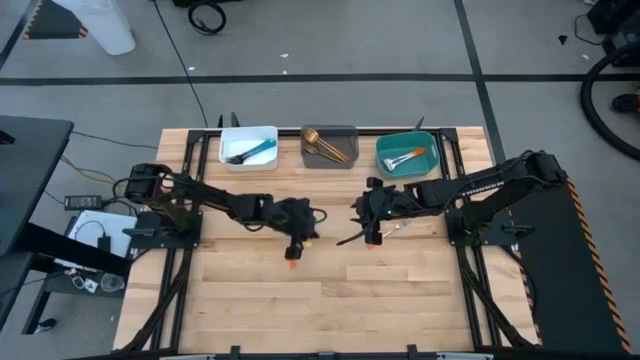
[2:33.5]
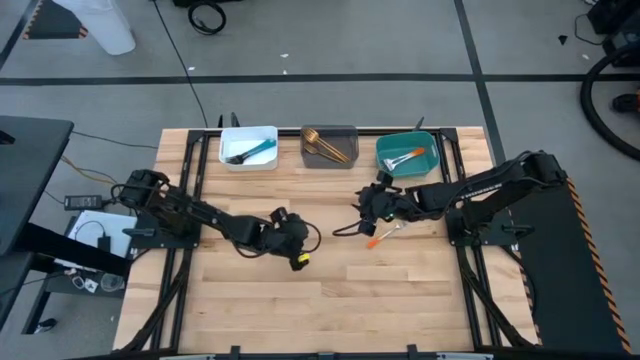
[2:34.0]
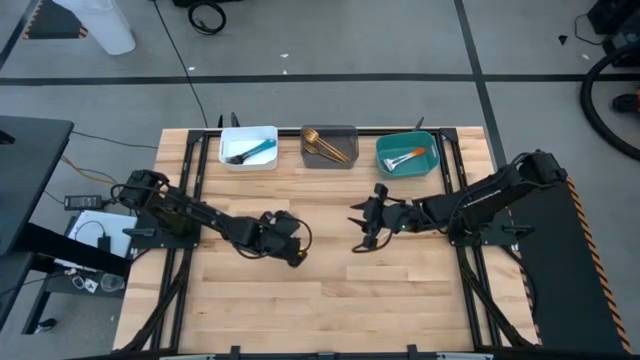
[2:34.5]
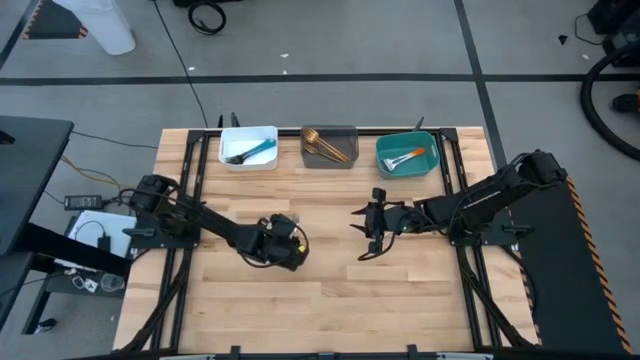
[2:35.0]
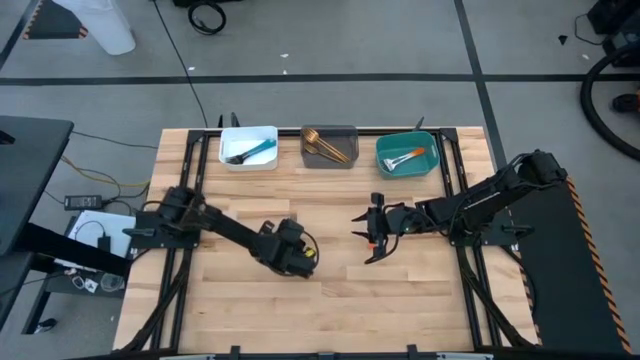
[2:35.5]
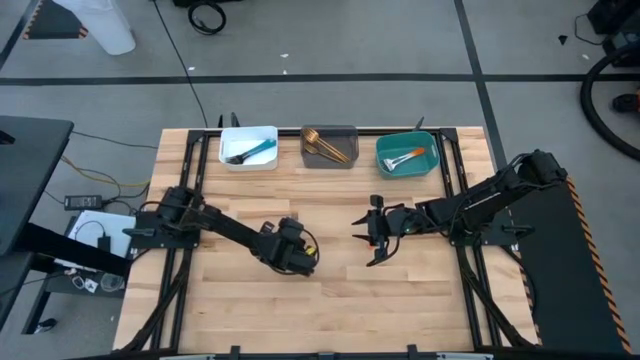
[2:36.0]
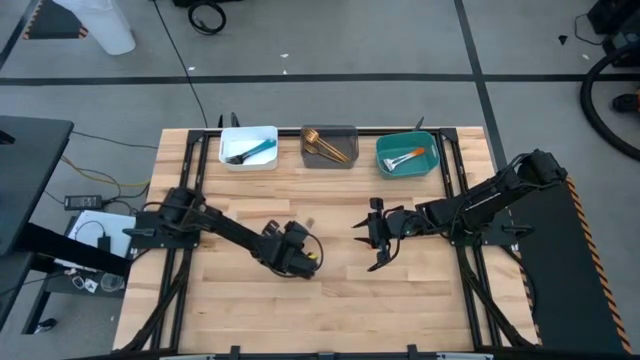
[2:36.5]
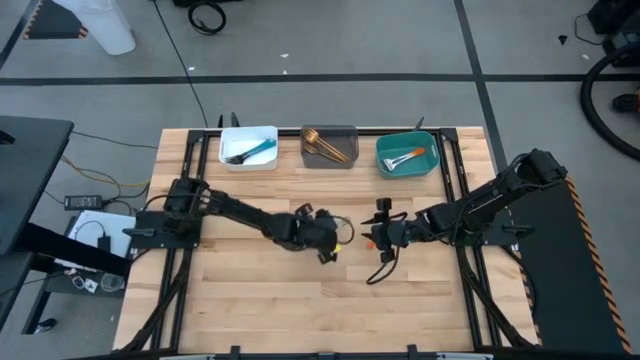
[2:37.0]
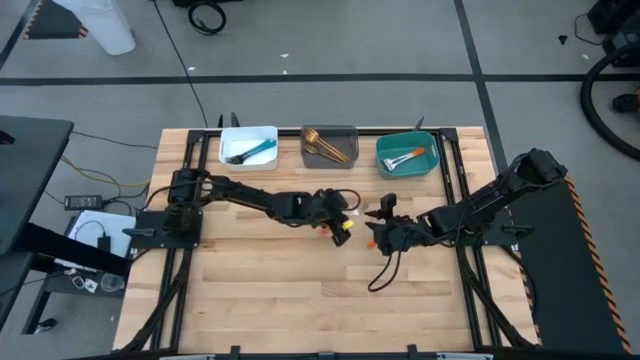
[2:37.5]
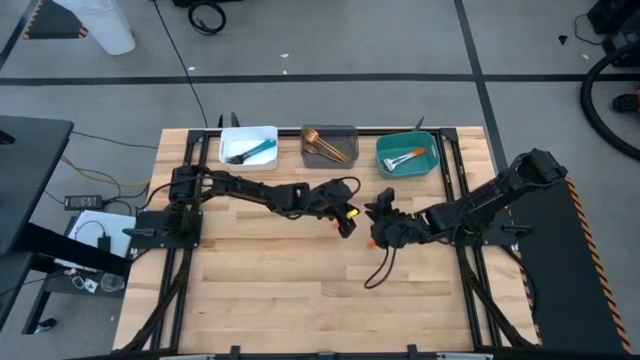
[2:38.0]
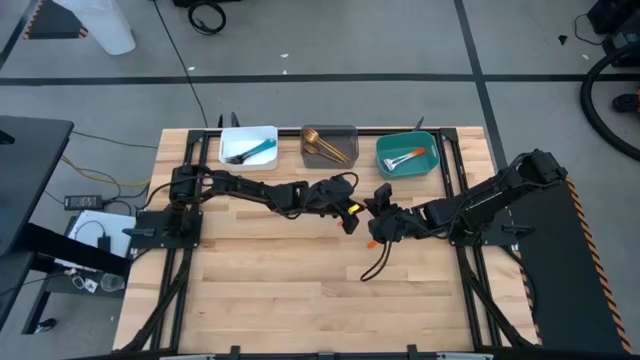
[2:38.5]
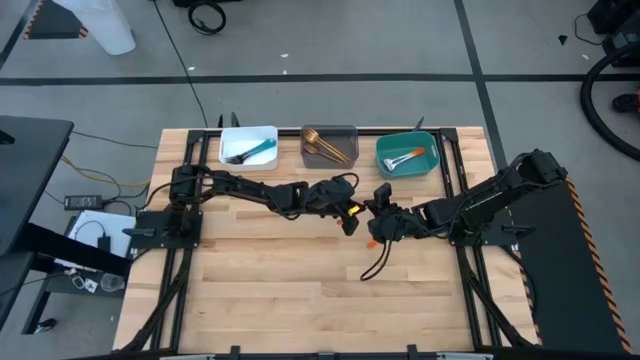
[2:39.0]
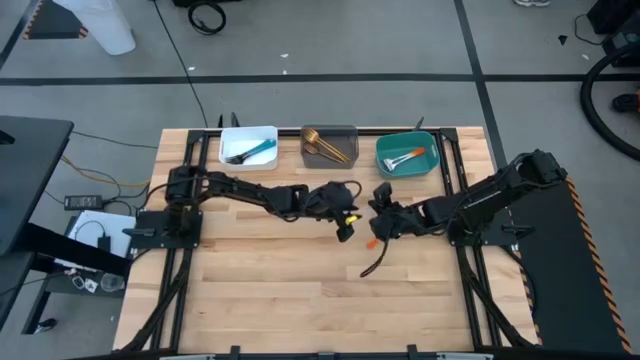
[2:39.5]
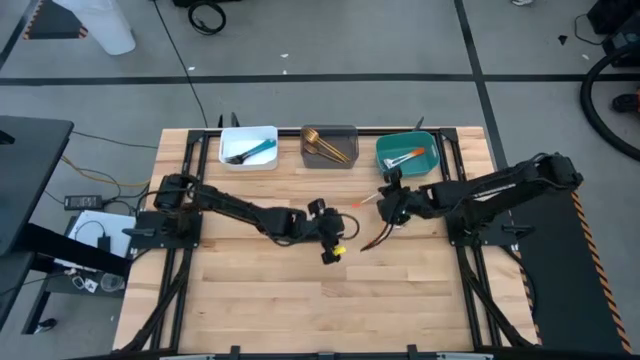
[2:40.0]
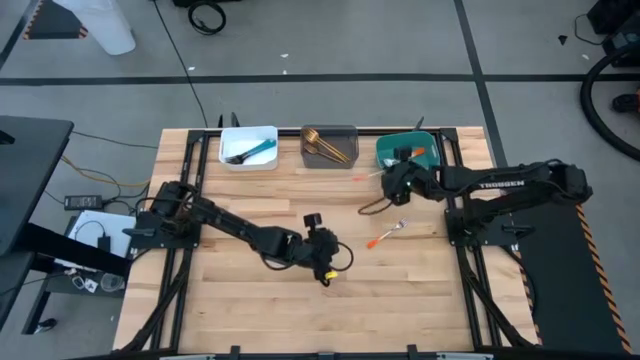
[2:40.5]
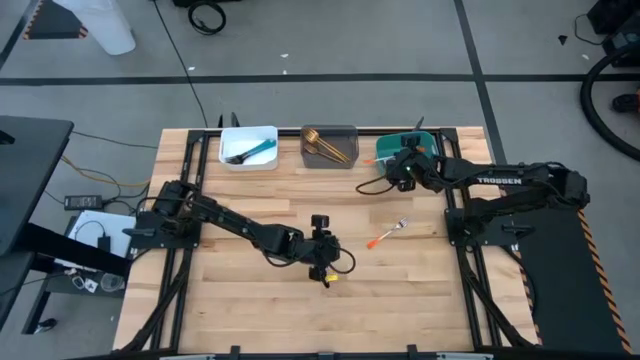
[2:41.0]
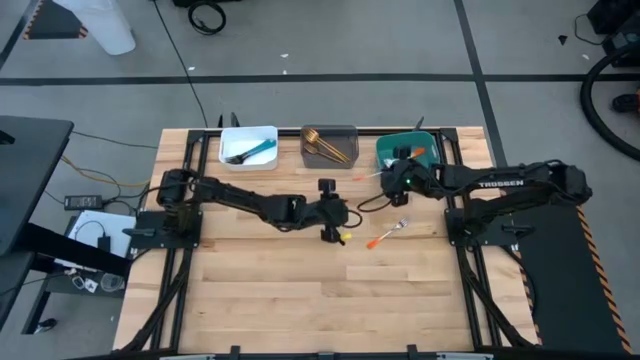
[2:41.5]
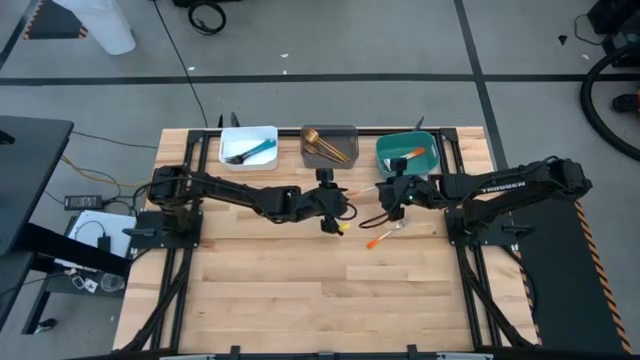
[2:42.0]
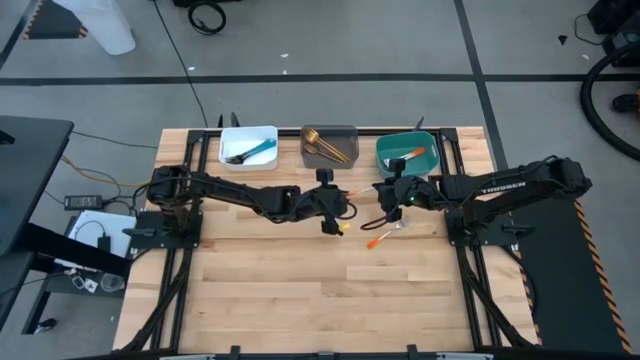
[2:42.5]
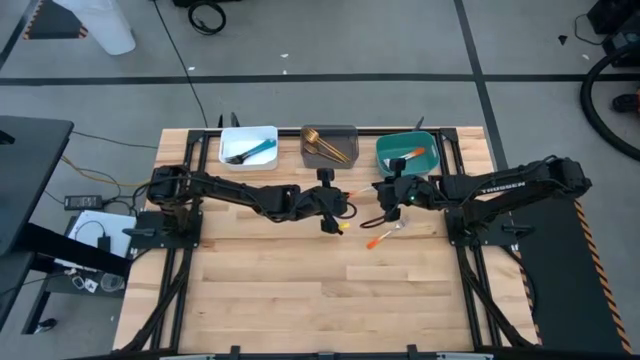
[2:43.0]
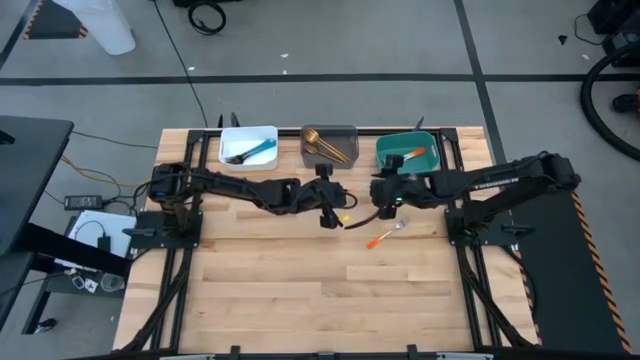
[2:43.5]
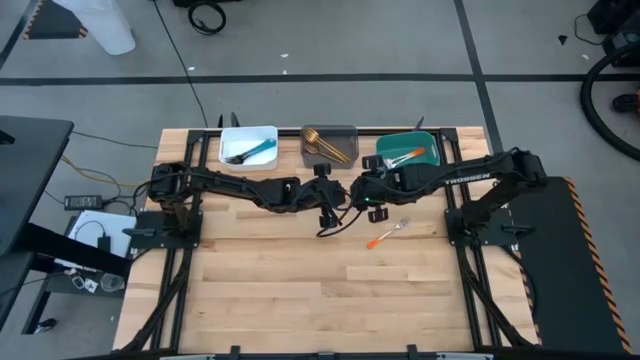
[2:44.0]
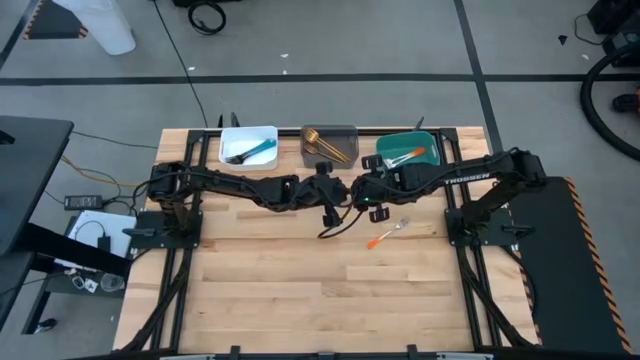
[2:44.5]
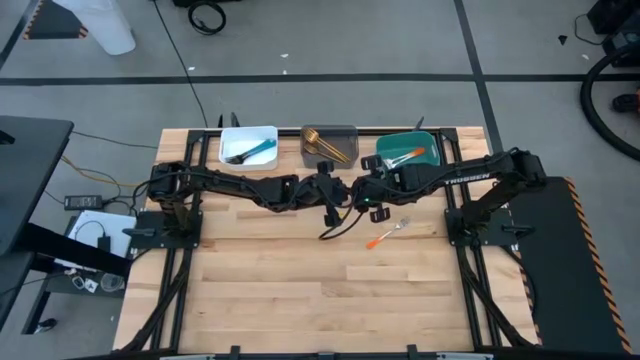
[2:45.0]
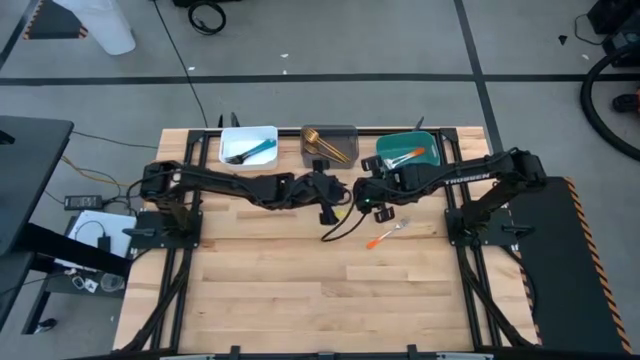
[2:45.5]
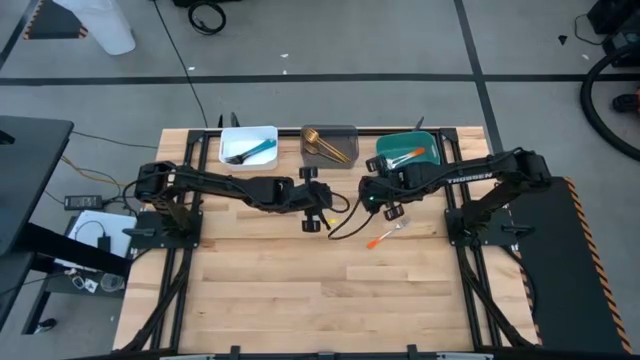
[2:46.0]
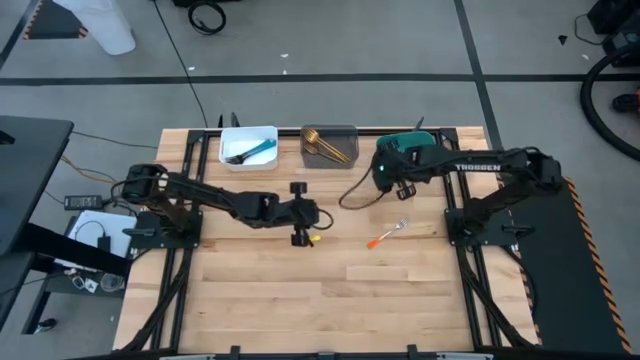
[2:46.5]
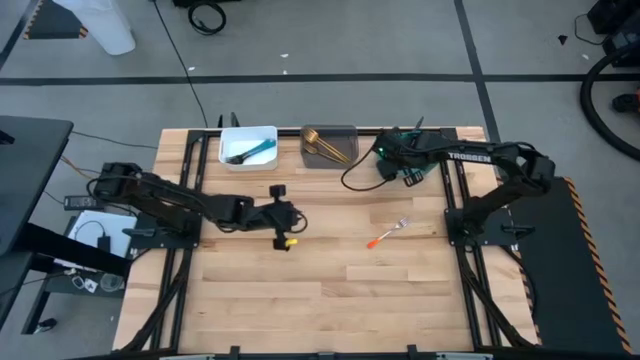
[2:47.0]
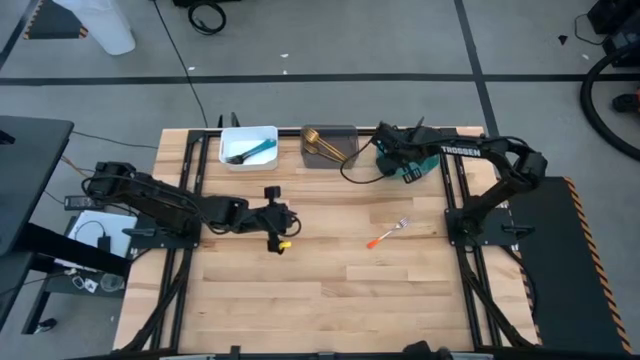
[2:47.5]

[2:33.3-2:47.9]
Task: Sort silverware by color (type)
Put the right orange fork into the green bin

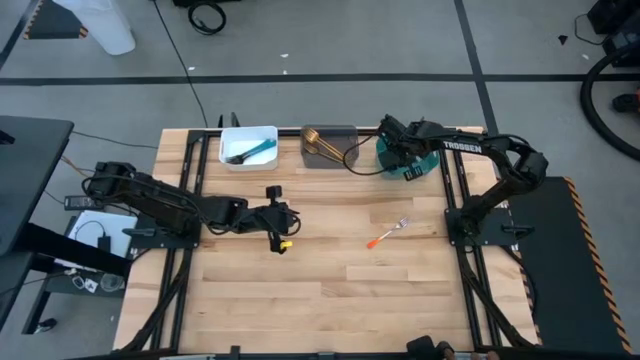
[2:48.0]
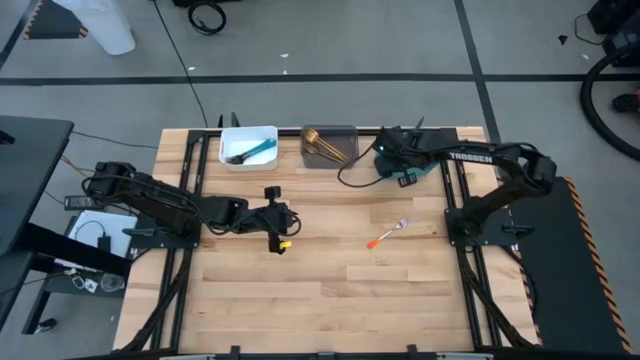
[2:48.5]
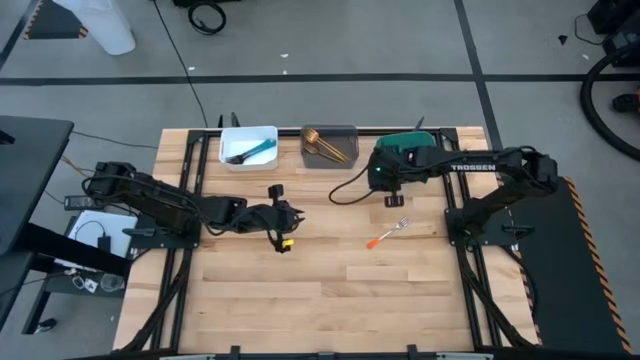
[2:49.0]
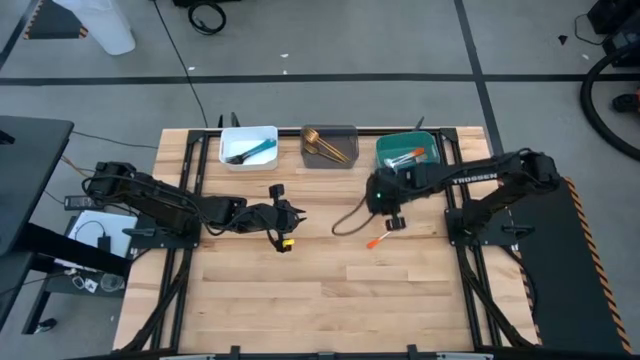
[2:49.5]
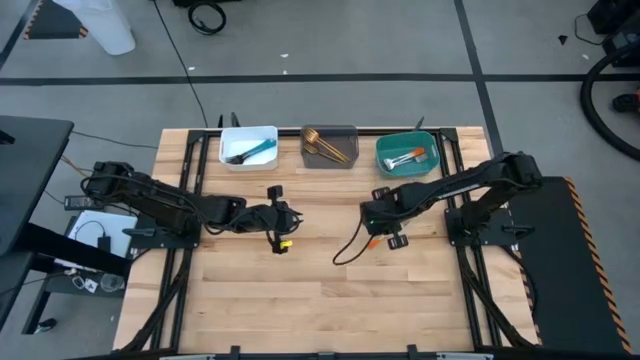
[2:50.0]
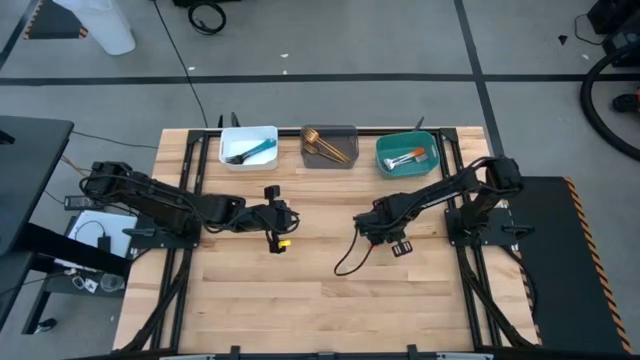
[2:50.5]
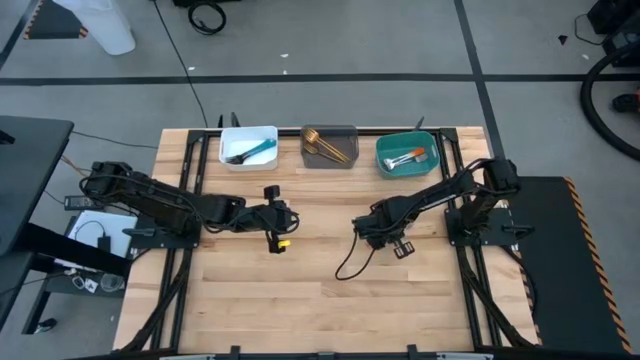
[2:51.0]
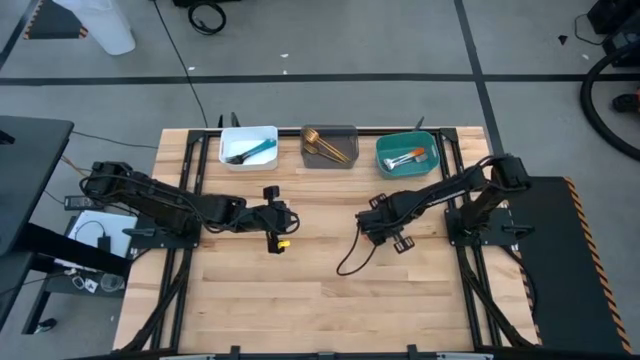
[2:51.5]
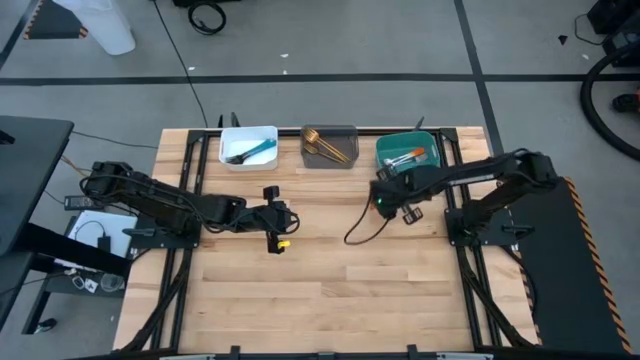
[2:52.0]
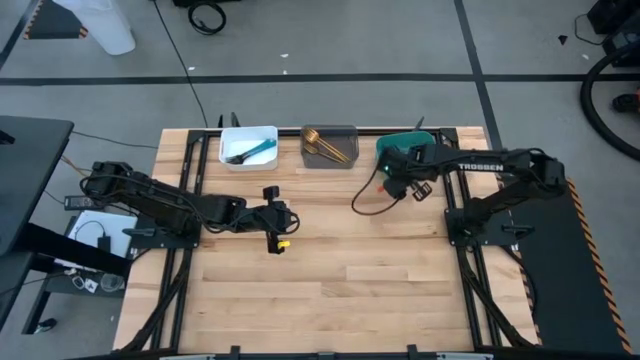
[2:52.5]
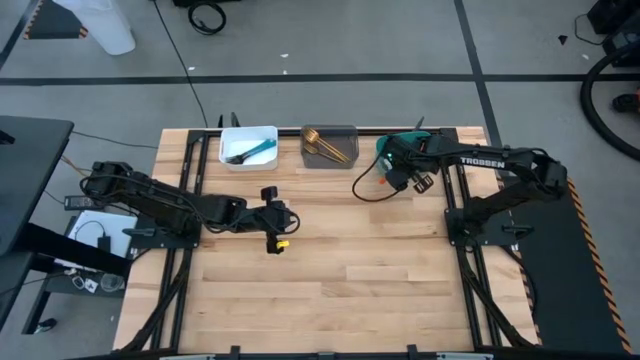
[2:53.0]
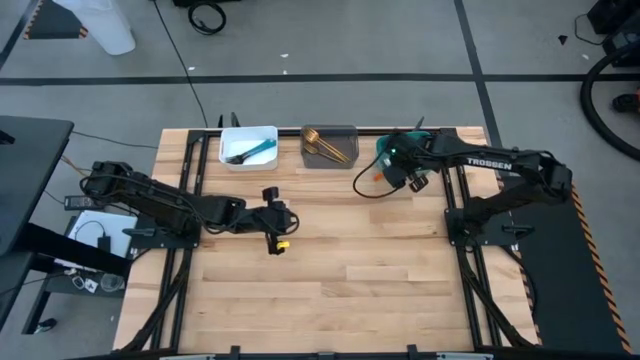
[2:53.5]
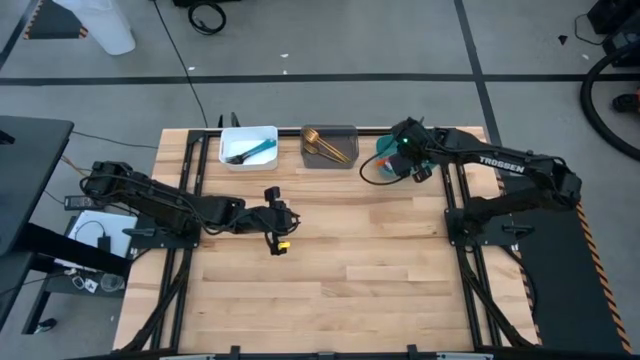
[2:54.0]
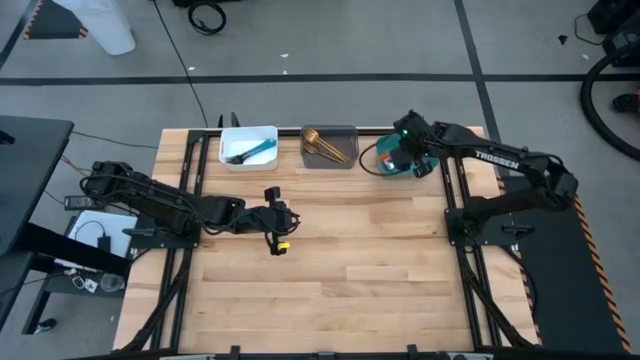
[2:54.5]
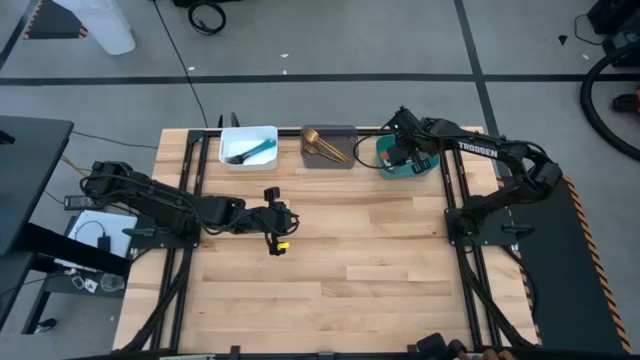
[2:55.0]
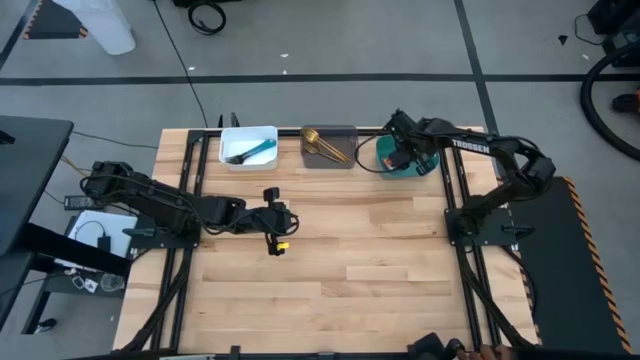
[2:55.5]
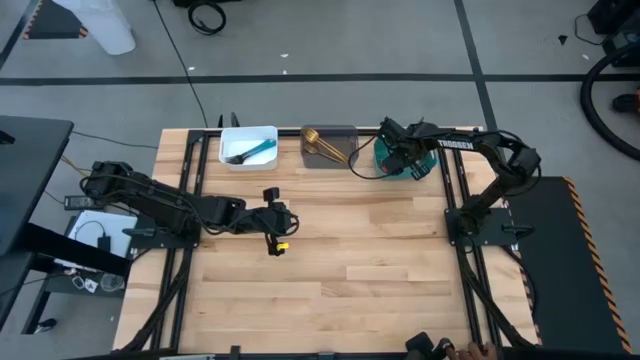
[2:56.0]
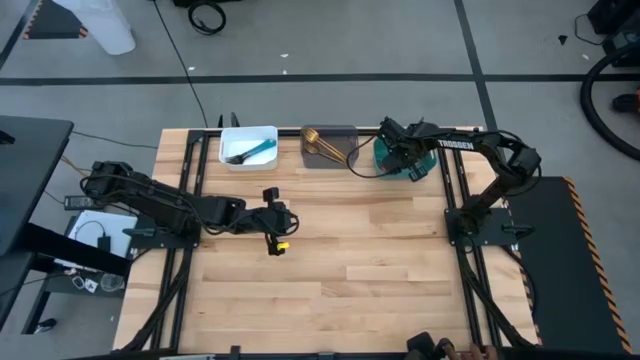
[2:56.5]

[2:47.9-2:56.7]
Put the orange fork into the green bin
